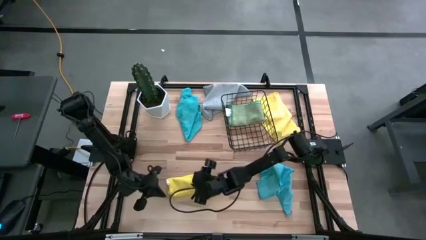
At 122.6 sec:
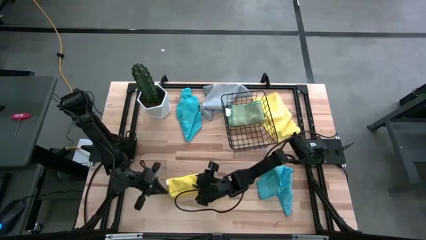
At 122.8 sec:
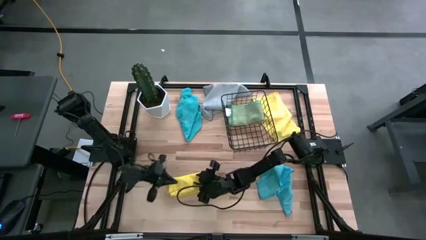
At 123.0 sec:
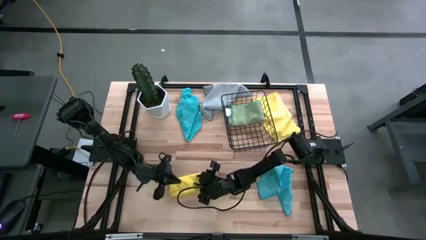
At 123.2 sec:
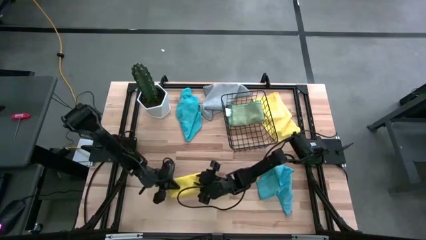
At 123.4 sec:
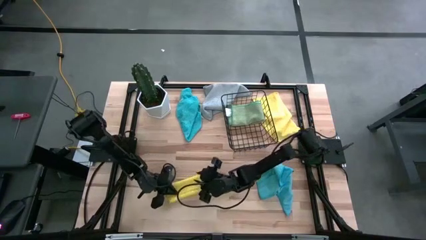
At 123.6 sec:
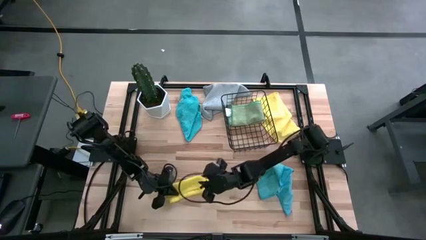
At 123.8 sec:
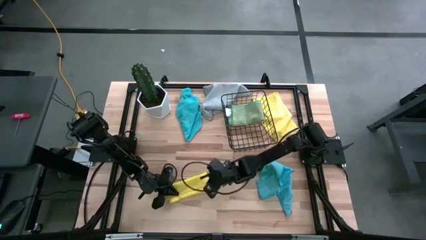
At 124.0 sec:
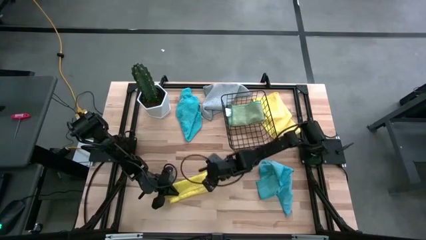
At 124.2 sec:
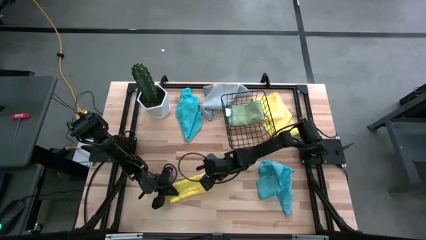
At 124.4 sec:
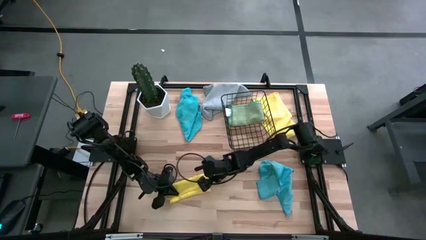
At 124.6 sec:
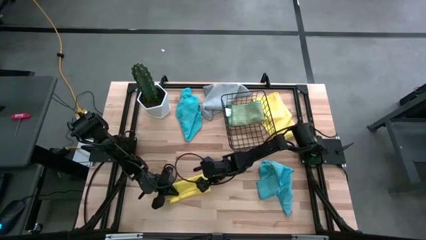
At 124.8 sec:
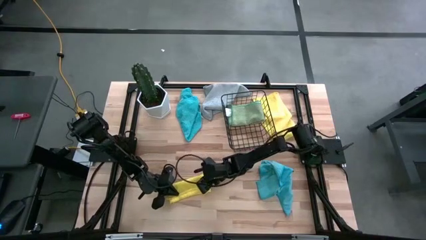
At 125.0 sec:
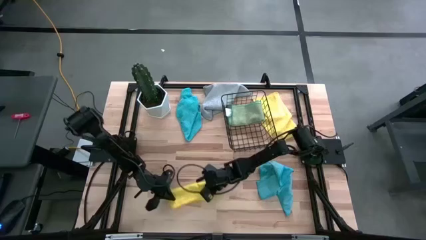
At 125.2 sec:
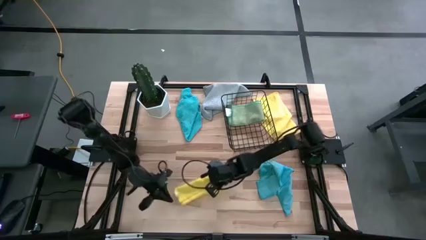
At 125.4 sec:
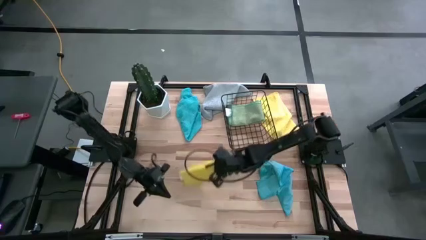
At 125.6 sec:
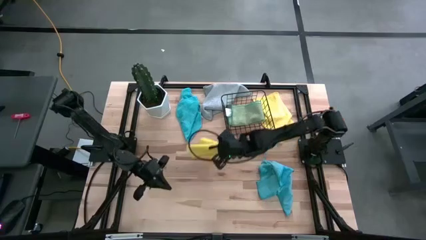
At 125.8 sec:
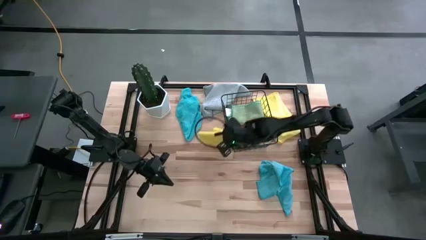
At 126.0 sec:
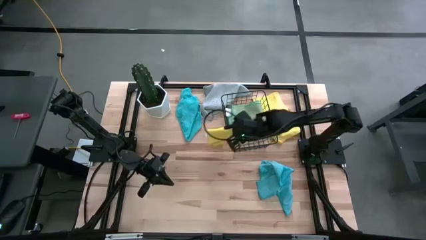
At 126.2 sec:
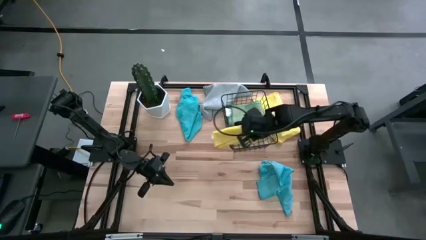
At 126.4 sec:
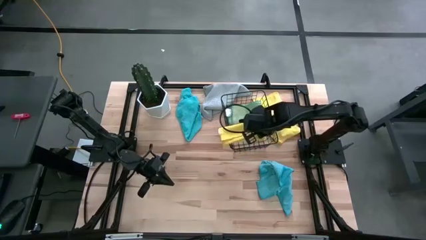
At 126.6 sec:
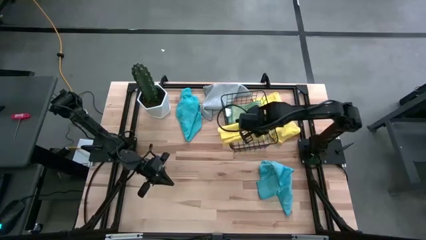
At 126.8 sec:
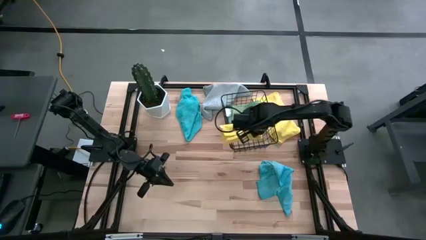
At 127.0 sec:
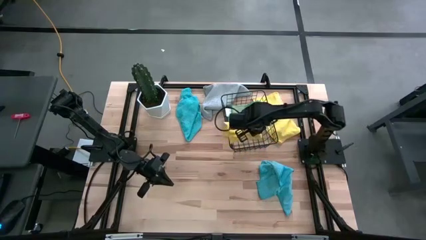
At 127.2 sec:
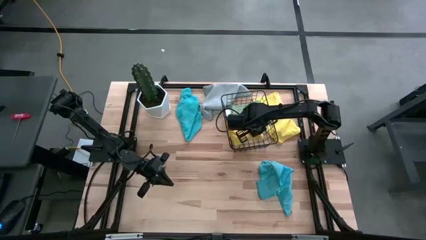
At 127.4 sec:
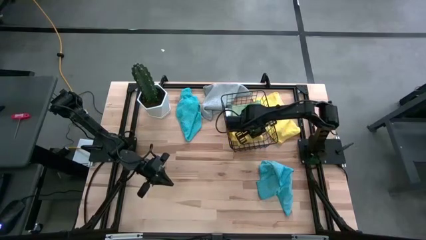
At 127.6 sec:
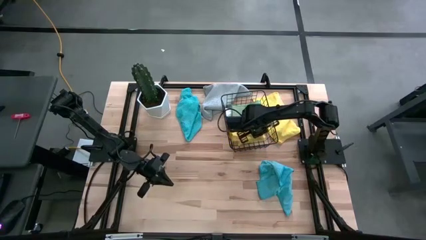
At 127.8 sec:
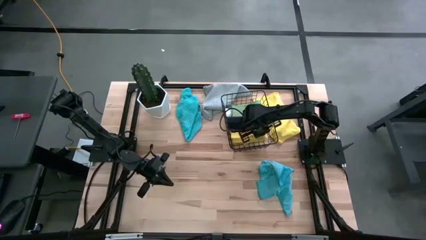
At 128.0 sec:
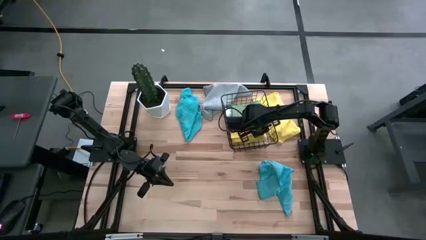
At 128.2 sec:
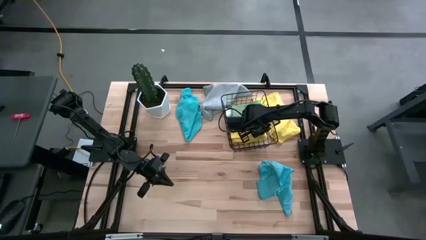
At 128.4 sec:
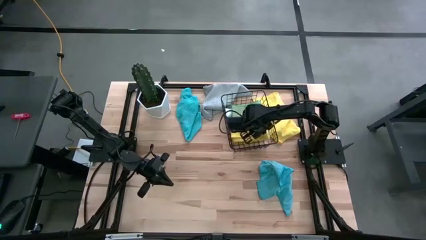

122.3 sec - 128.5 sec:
Task: Fold microfiber towels
Put the bottom folded yellow microfiber towel into the black wire basket

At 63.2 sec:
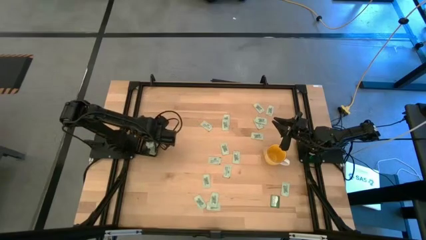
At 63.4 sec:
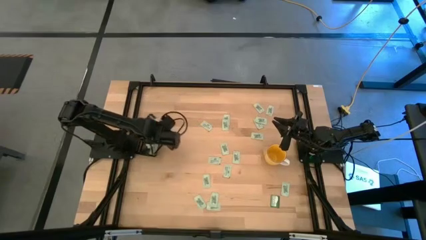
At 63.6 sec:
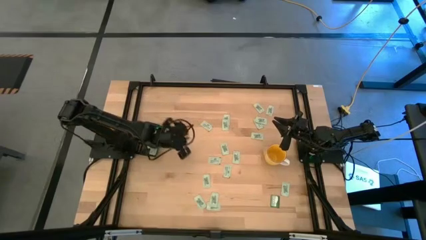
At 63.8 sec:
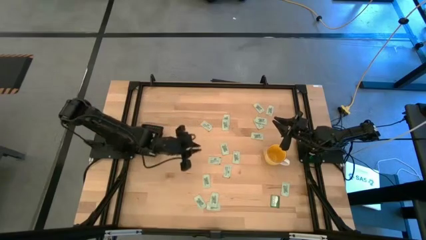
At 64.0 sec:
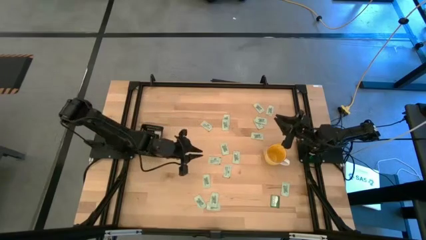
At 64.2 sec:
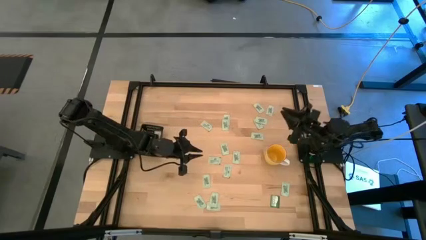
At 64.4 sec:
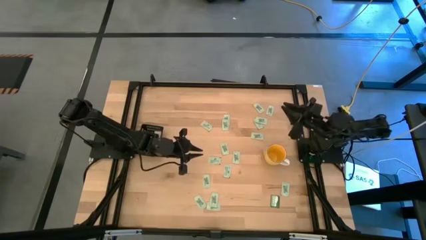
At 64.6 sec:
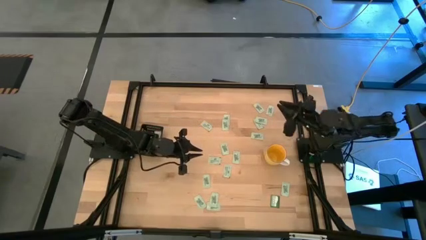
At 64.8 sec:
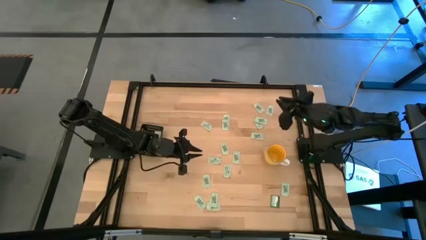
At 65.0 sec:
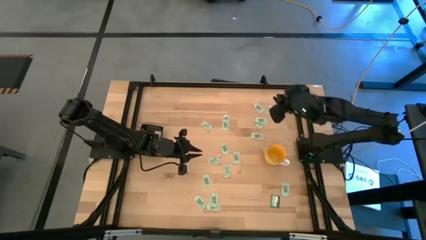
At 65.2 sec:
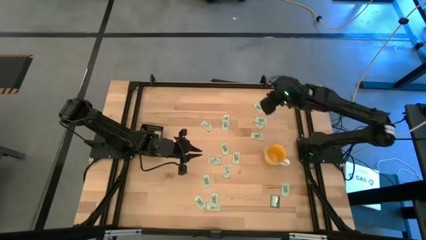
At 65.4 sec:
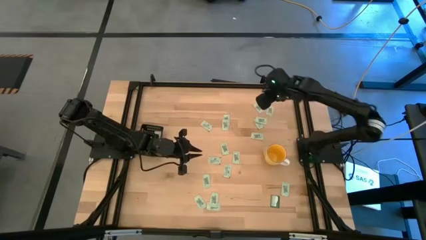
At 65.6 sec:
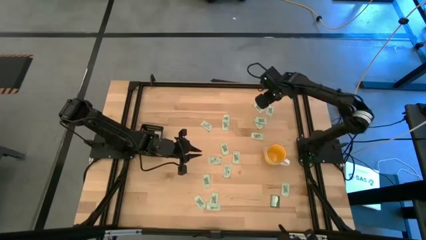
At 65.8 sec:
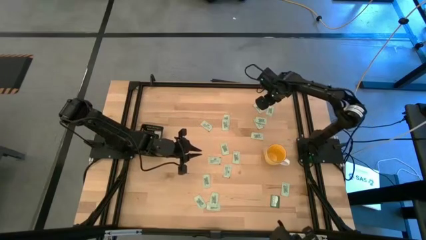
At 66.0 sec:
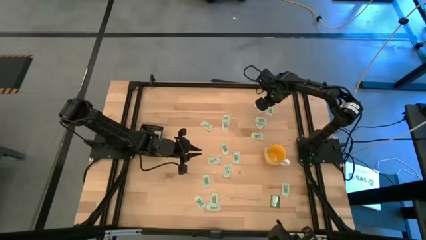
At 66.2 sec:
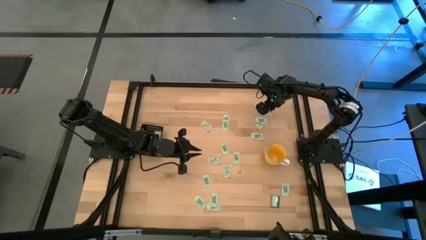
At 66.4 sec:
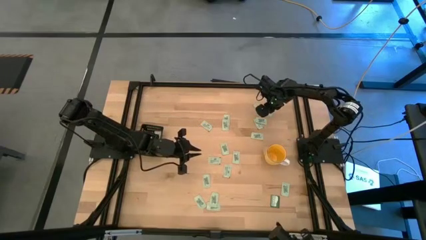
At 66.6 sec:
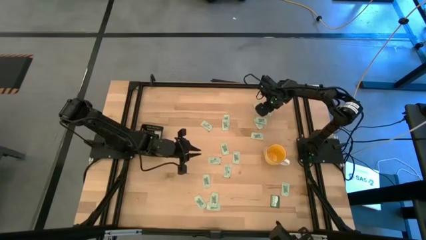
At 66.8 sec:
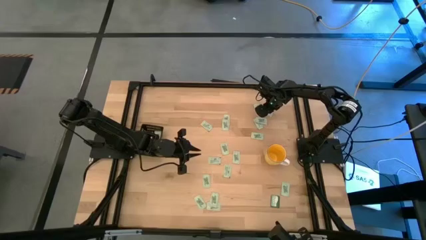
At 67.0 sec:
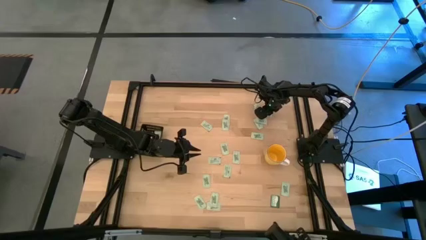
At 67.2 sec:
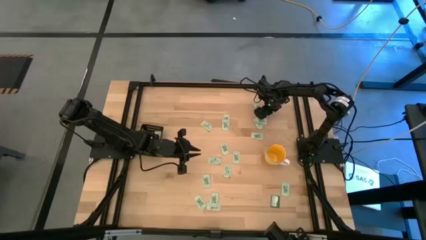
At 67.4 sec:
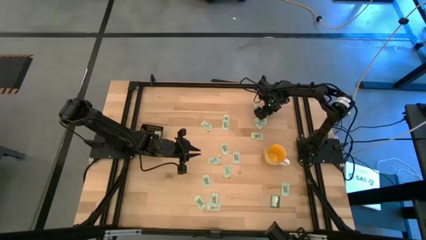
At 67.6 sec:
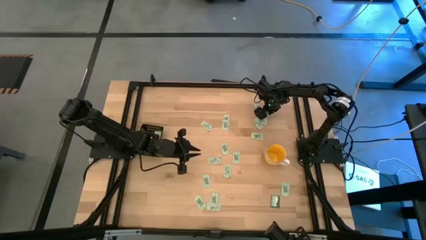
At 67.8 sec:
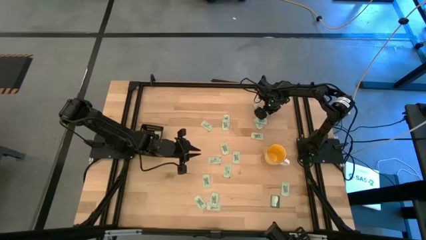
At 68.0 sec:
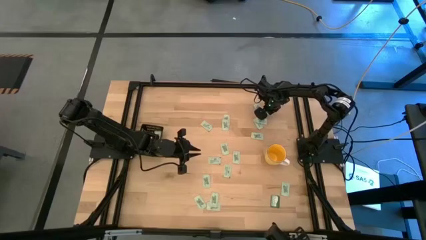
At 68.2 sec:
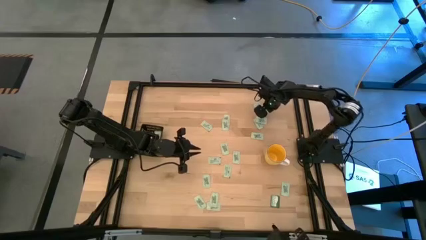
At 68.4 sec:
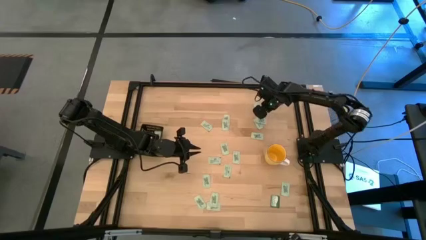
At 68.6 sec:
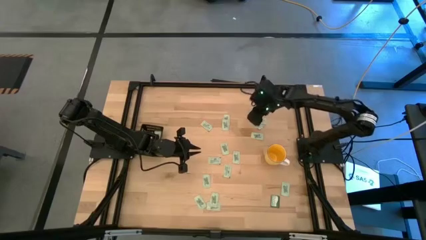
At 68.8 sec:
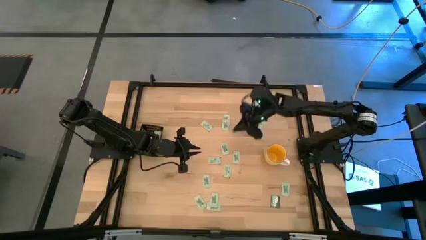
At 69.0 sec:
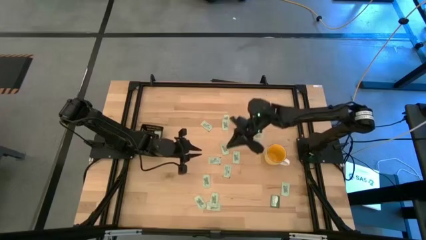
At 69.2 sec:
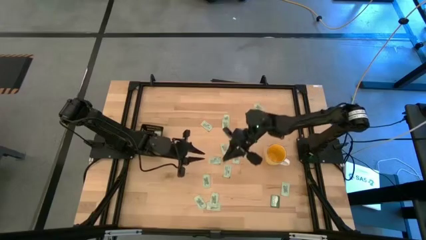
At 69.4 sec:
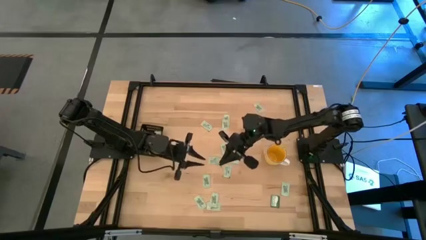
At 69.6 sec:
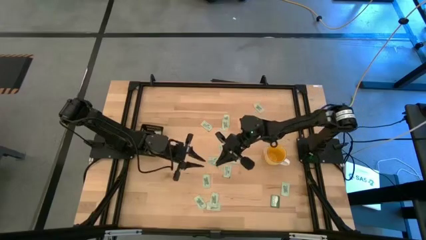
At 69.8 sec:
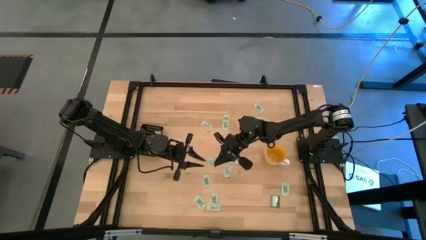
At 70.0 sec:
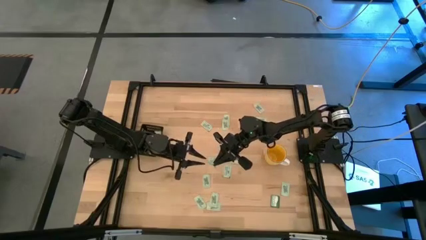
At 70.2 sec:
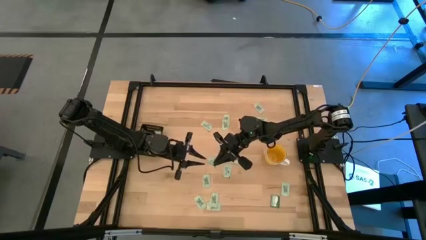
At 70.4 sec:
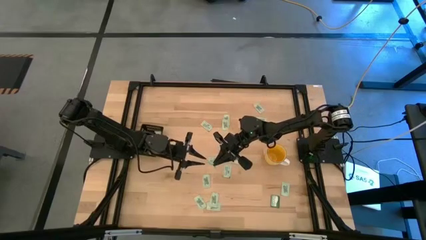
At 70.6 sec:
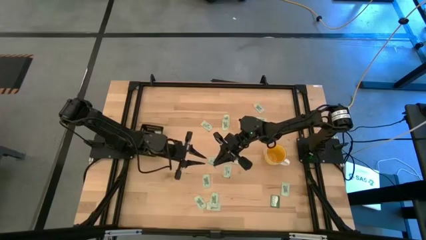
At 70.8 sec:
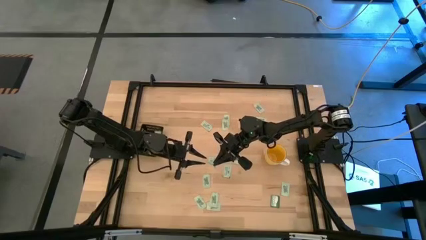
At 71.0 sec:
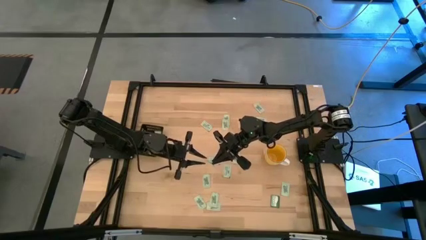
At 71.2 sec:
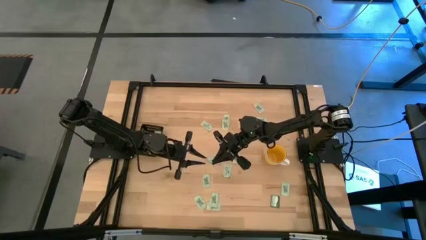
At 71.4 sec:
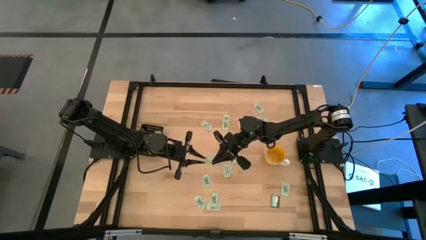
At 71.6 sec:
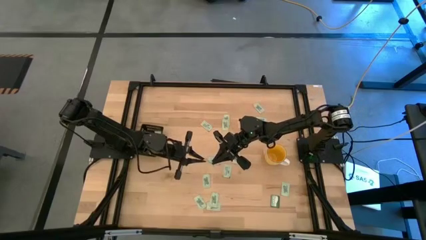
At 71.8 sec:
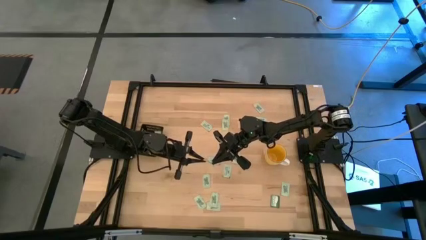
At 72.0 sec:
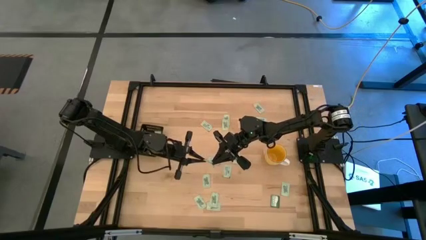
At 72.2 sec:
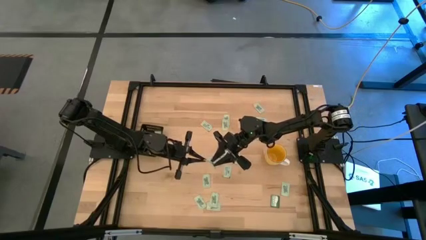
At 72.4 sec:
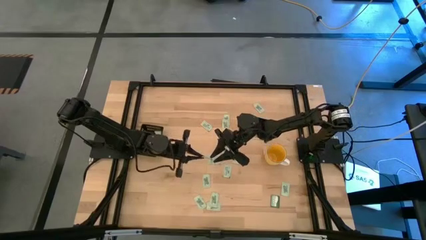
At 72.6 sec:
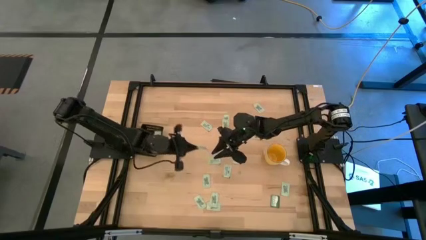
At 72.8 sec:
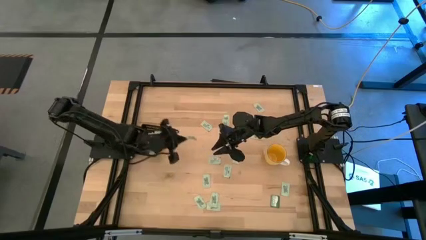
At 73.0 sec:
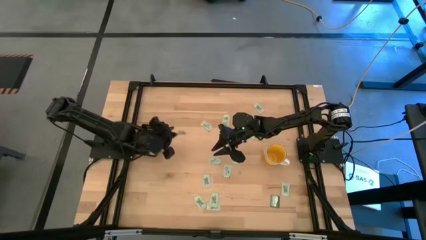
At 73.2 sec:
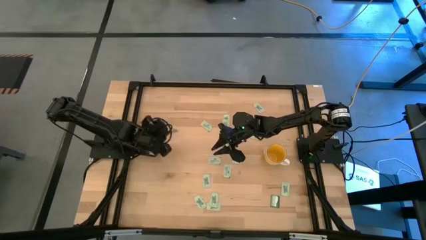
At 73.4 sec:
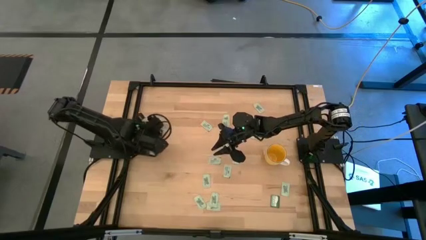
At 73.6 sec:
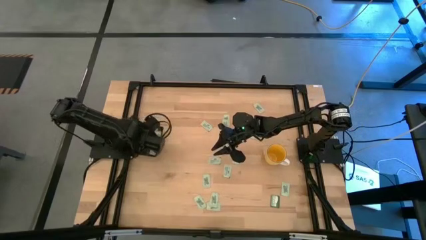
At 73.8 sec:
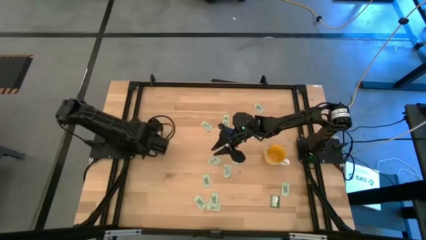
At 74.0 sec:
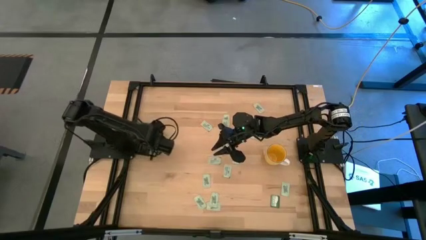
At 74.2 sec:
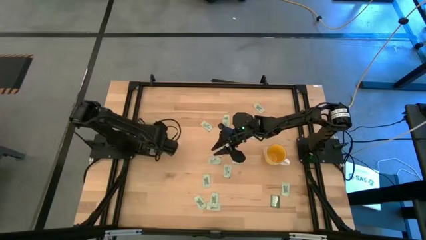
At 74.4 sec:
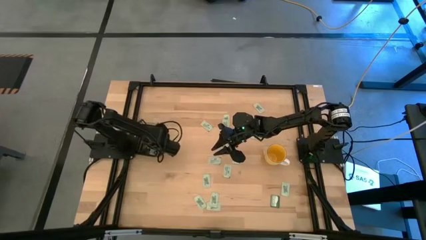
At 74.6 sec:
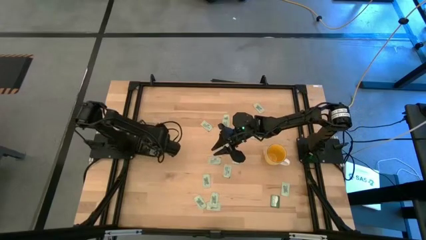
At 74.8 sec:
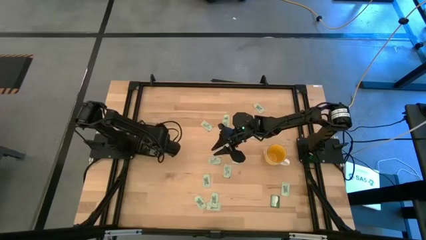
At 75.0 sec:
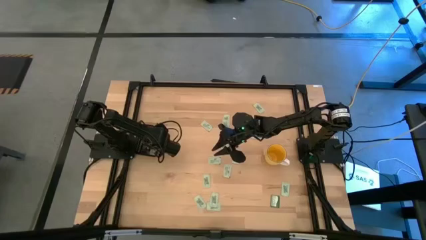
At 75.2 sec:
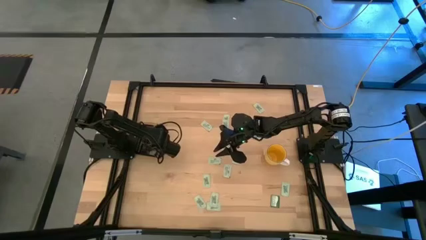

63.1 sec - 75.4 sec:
Task: Pick and place Stevia / Truvia into bins
Put the stevia packet into the black bin
